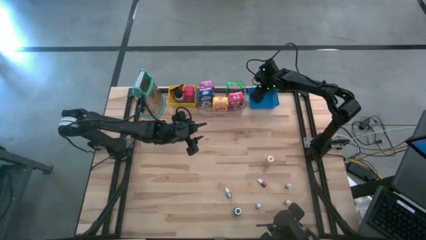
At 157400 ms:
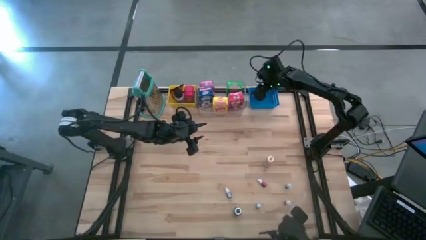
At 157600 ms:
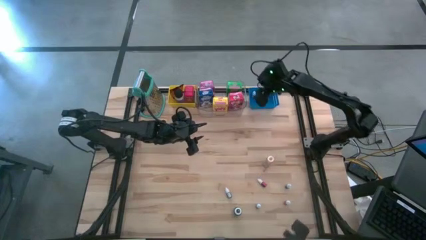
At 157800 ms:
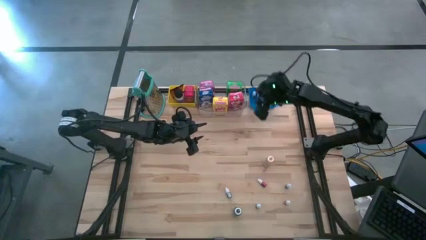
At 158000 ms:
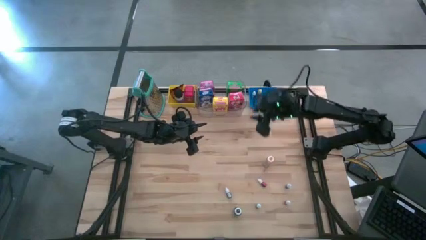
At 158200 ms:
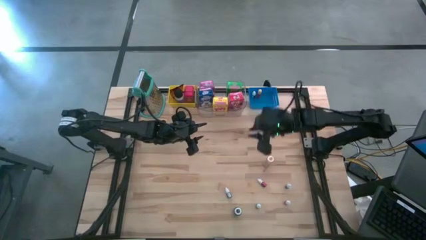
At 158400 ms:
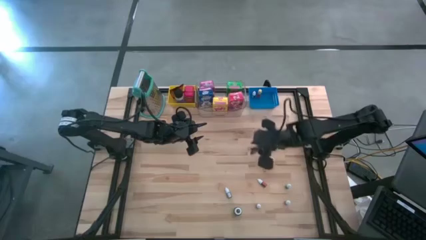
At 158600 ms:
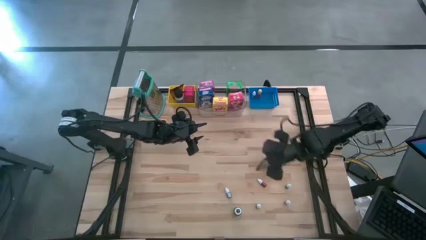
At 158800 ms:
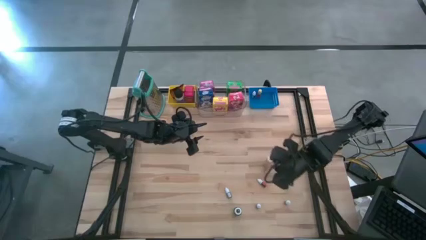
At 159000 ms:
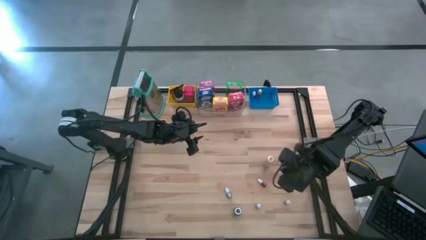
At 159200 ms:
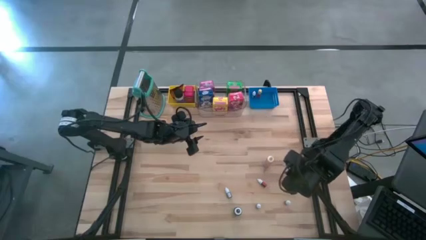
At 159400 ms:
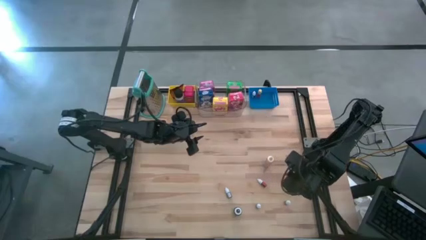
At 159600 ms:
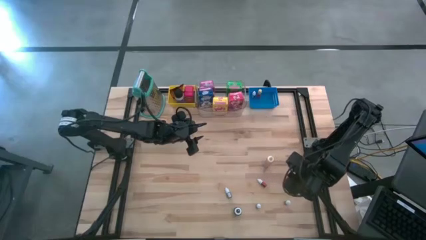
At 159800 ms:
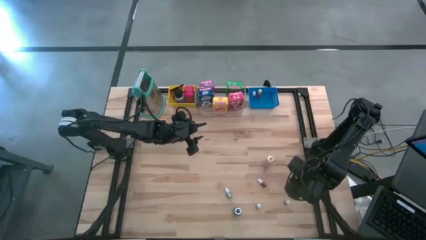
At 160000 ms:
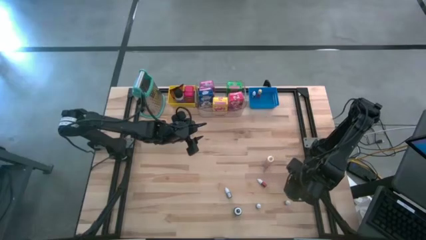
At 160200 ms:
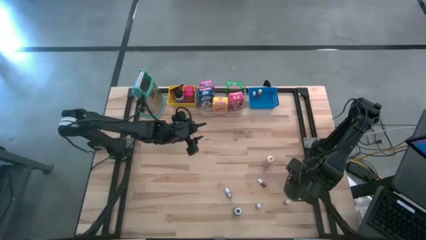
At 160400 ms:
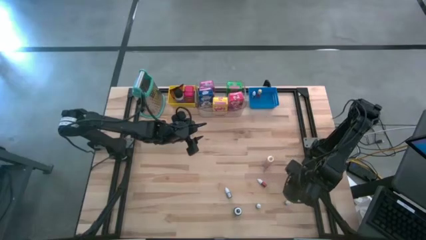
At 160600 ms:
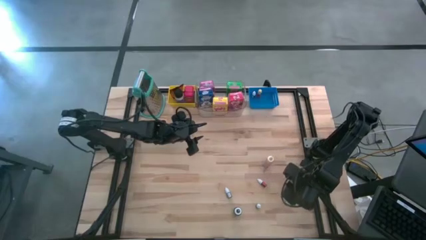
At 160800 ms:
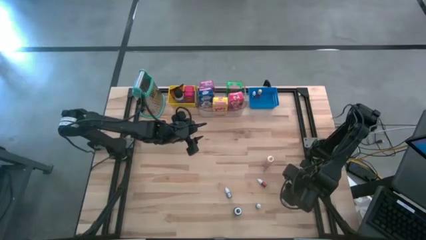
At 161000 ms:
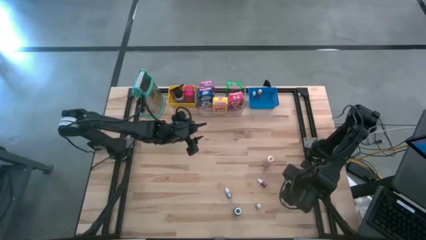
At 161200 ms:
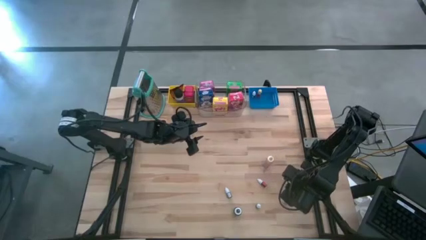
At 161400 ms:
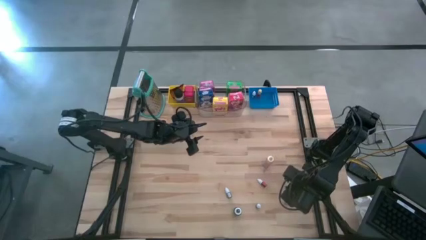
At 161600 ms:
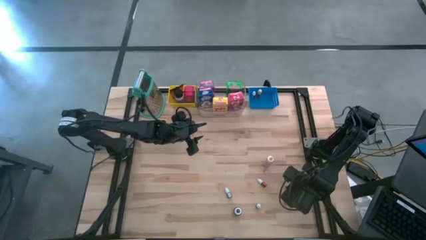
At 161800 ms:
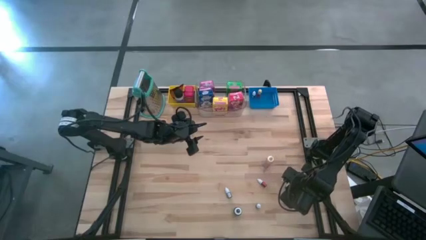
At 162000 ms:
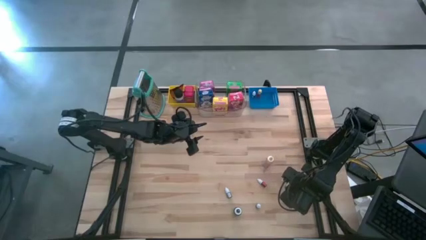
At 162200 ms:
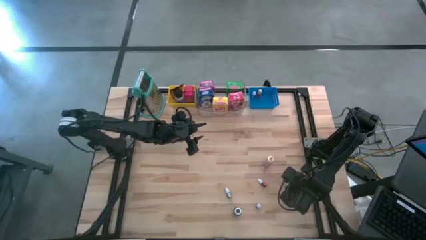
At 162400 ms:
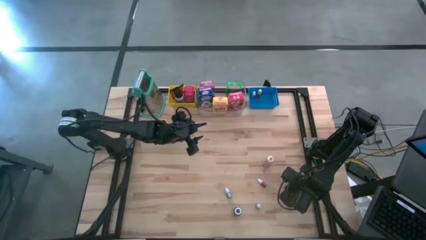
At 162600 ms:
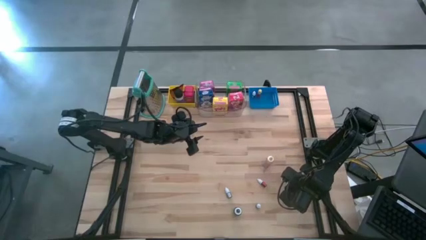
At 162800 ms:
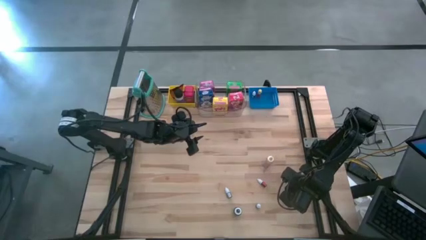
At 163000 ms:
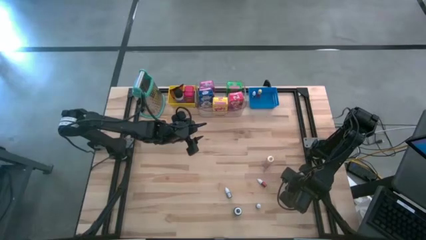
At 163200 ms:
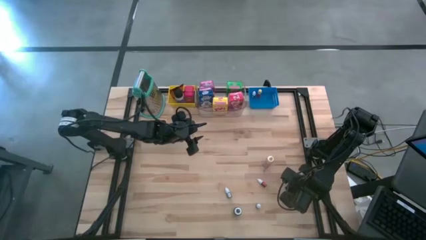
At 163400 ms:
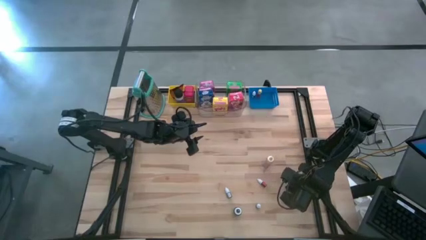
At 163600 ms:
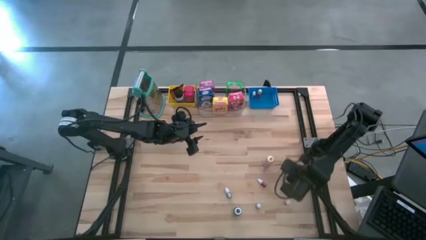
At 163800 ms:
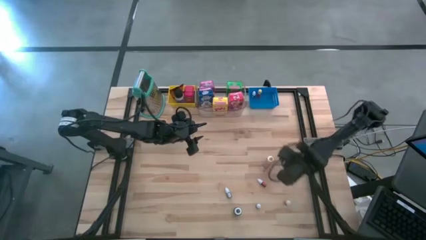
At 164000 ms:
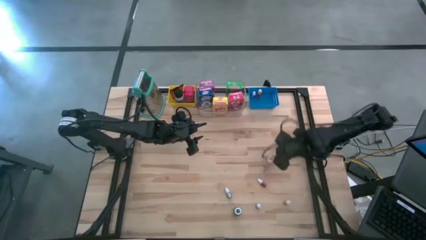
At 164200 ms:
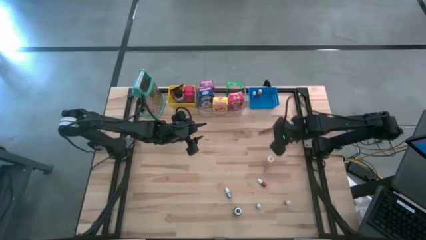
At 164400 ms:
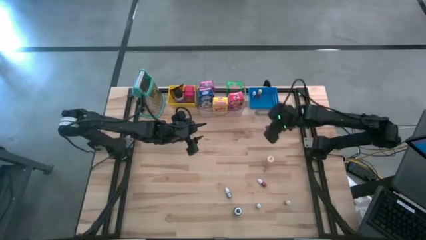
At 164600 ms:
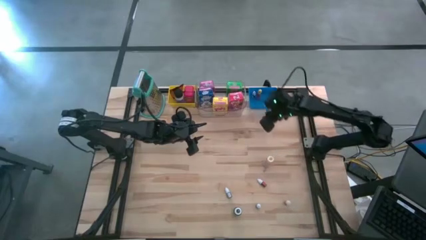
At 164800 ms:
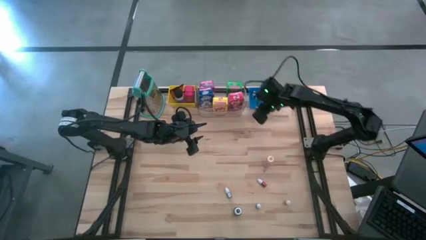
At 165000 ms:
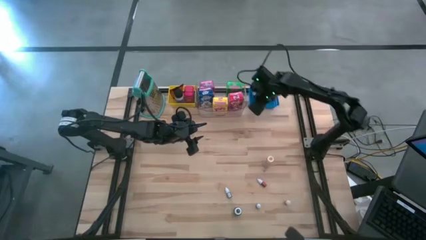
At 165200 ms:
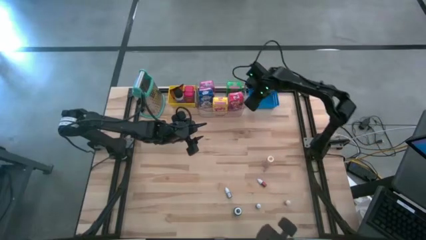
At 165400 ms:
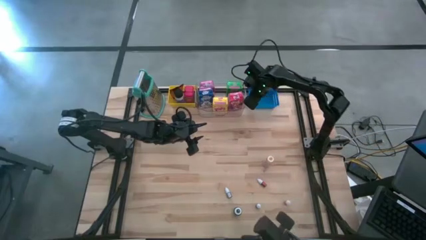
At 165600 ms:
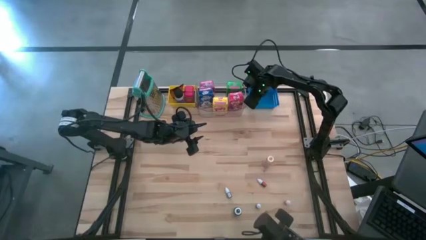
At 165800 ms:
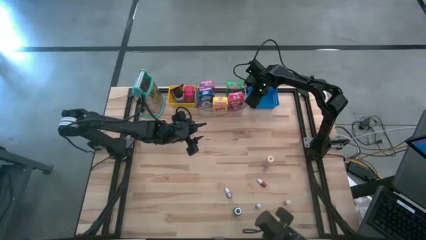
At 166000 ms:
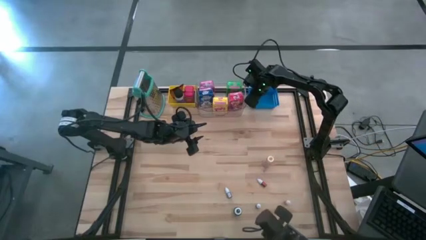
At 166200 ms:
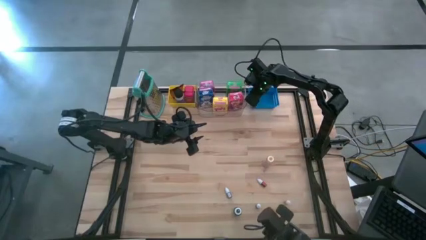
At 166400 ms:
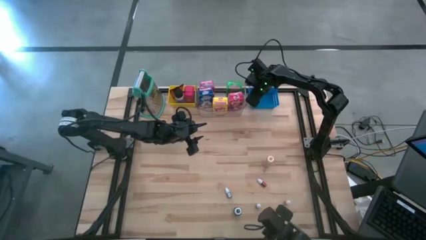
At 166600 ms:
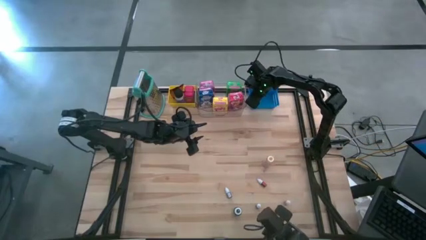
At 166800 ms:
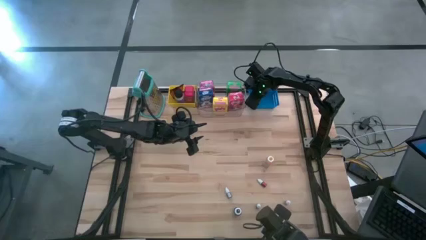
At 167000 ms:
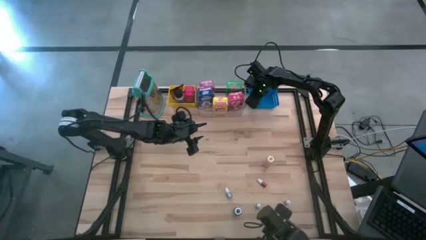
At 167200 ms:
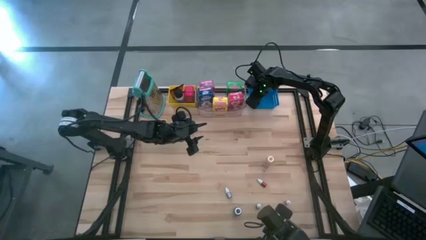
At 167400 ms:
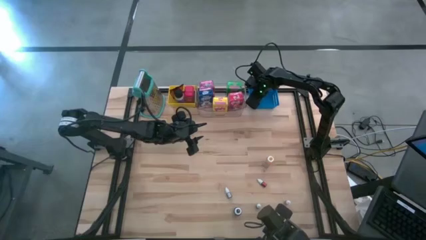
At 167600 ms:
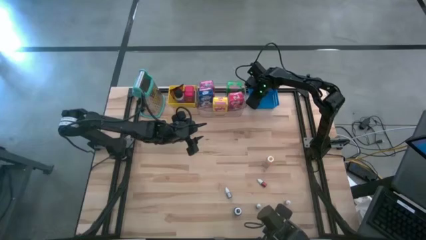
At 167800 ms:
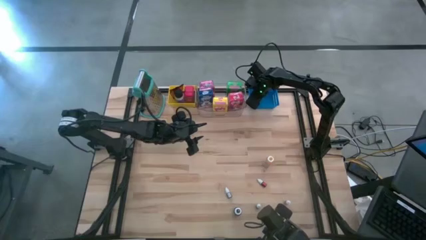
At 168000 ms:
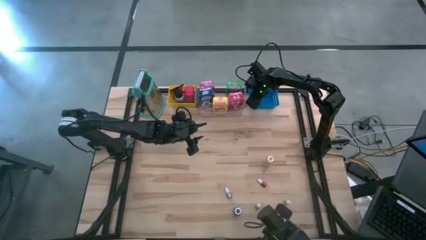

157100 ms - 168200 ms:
Task: Pick & Place Kitchen Items
Put the right purple bottle into the blue bin
